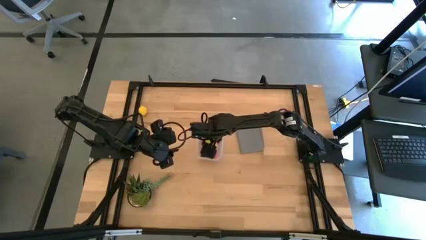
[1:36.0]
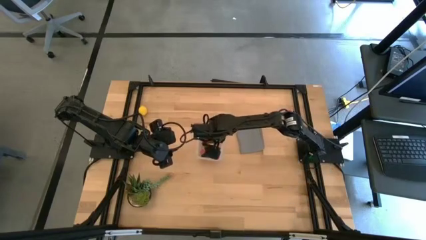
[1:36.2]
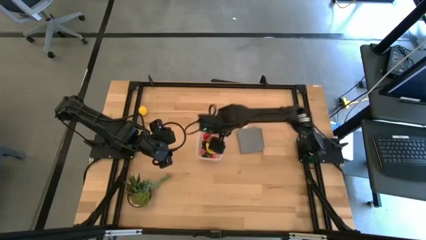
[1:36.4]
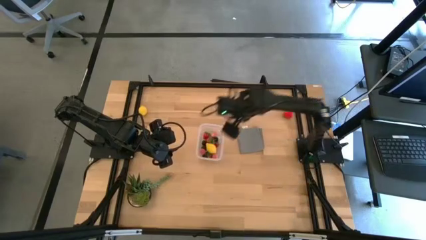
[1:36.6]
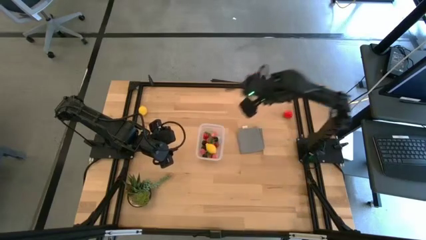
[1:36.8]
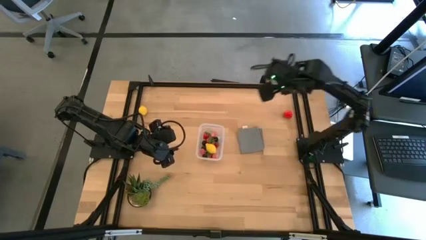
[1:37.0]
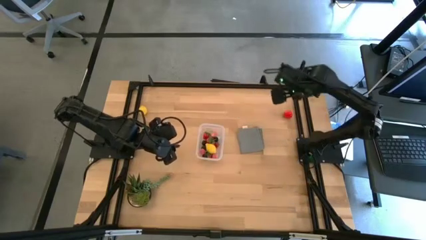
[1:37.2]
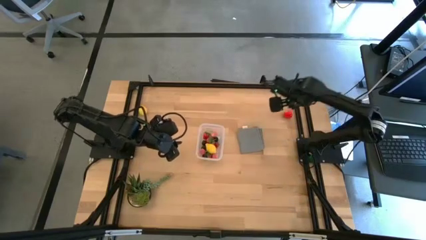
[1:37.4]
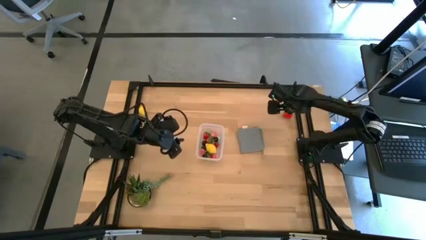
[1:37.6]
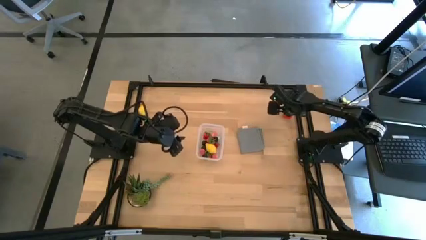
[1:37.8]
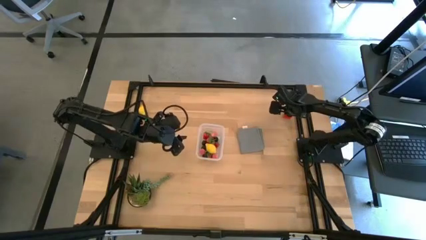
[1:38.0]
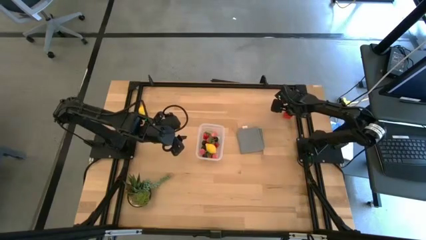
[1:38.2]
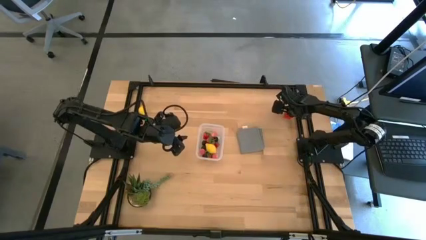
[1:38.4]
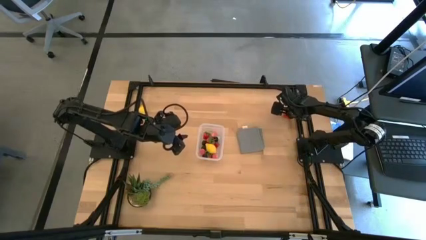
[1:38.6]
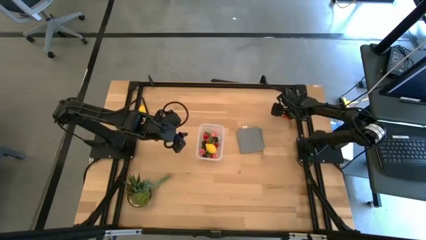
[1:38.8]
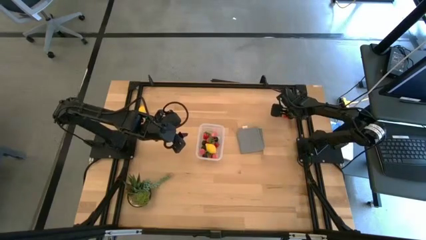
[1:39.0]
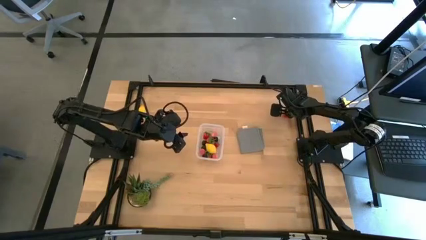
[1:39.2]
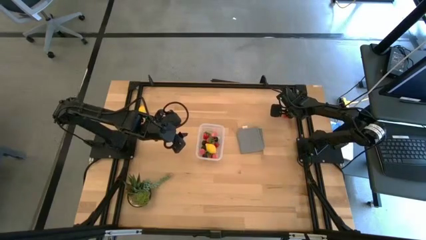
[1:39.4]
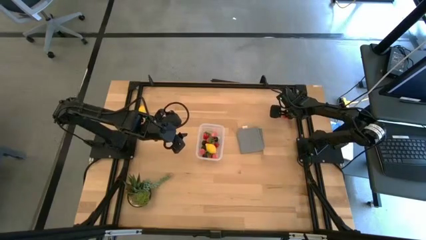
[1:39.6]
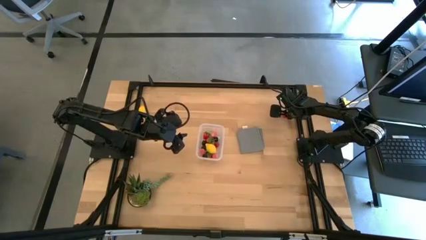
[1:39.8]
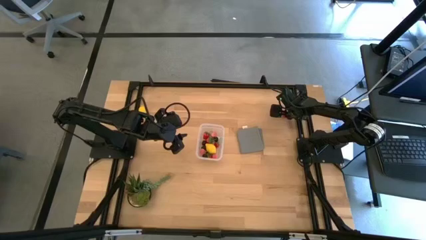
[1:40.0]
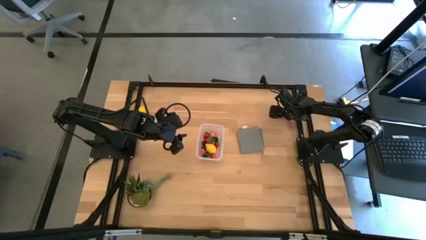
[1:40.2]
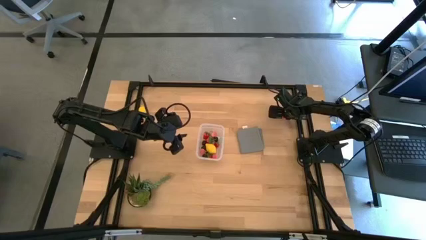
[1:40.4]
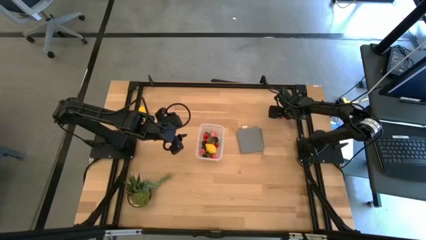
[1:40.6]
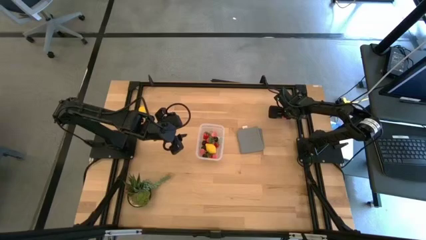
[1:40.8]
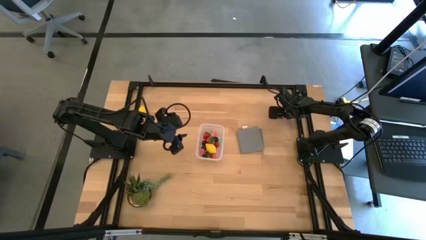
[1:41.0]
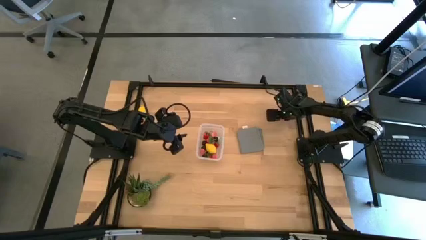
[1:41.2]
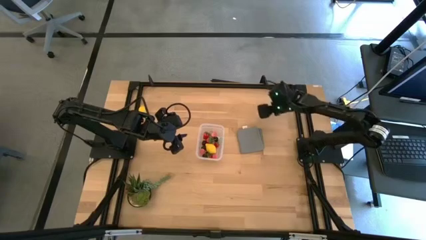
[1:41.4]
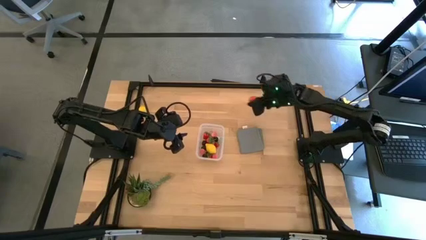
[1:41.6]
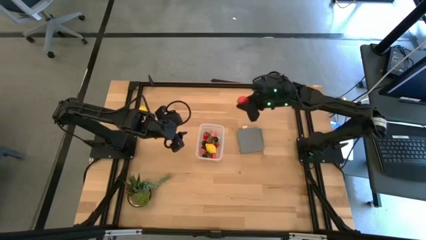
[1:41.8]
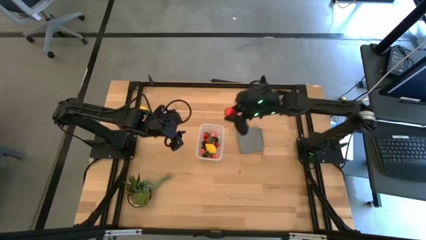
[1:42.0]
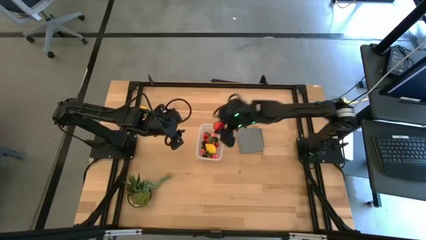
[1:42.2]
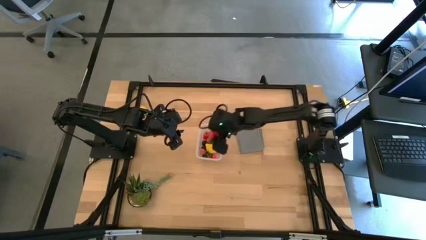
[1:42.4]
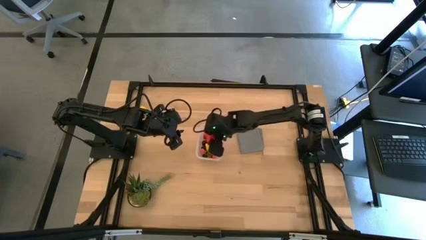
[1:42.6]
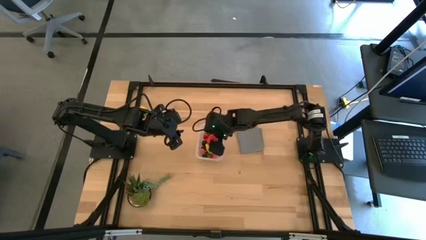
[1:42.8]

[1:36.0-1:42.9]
Task: Pick and placing Produce into tupperware
Put the strawberry into the transparent bin

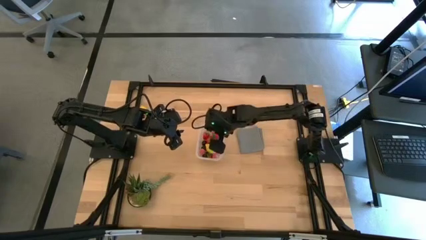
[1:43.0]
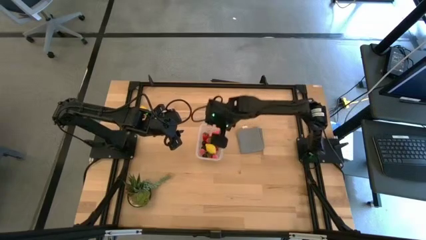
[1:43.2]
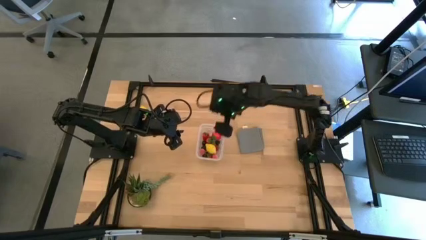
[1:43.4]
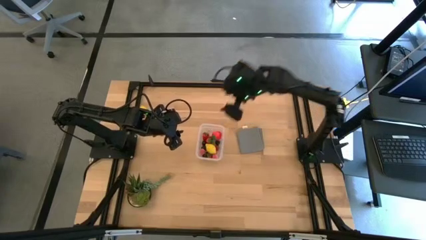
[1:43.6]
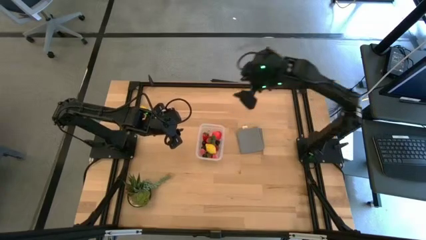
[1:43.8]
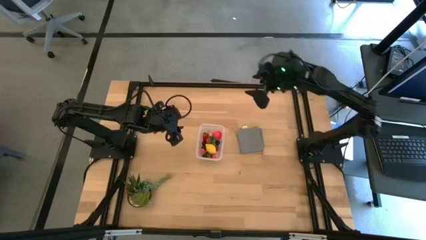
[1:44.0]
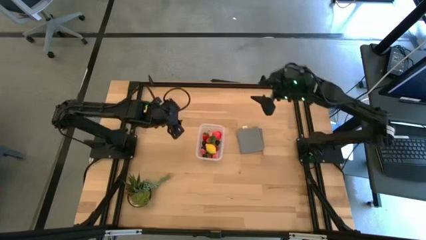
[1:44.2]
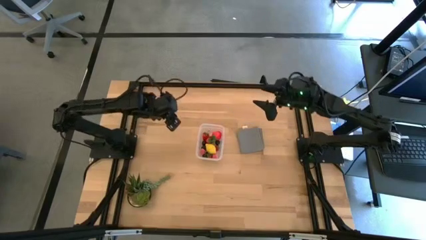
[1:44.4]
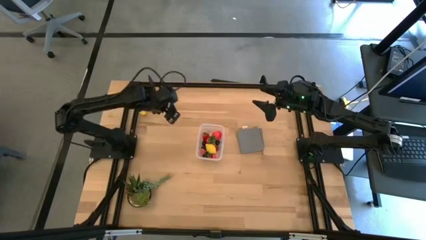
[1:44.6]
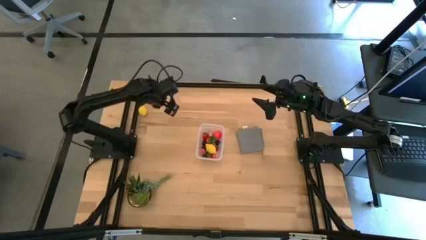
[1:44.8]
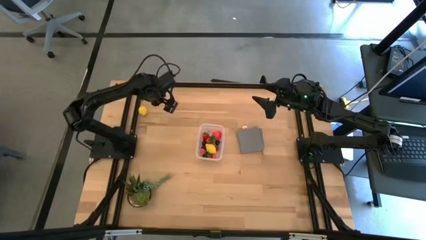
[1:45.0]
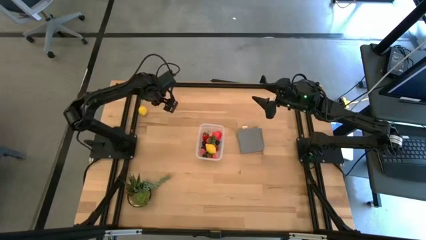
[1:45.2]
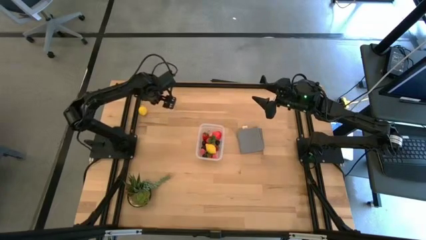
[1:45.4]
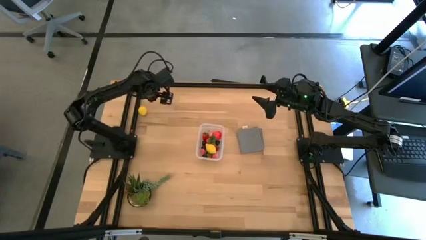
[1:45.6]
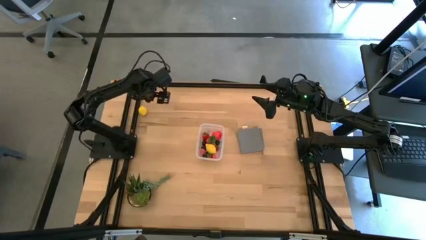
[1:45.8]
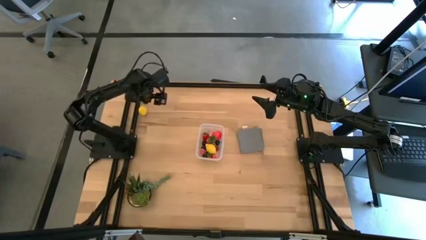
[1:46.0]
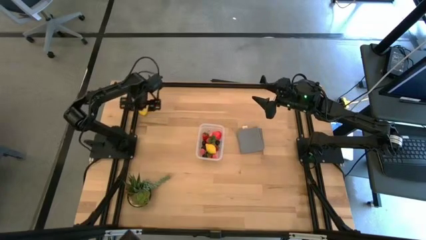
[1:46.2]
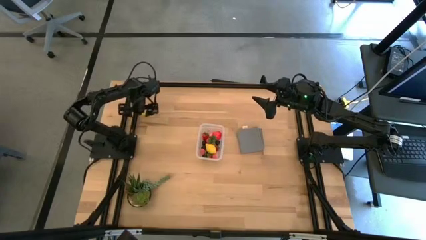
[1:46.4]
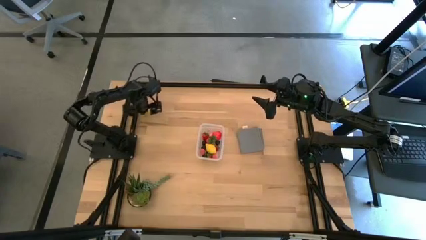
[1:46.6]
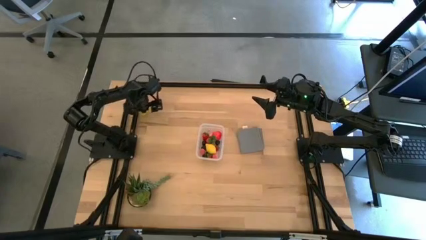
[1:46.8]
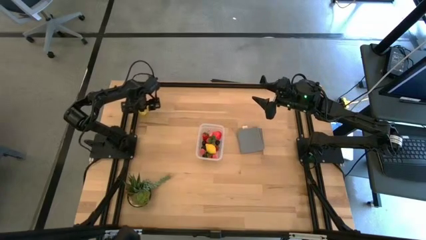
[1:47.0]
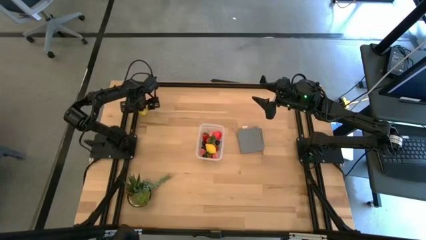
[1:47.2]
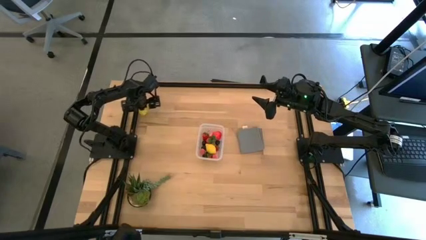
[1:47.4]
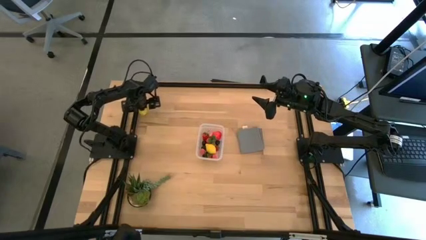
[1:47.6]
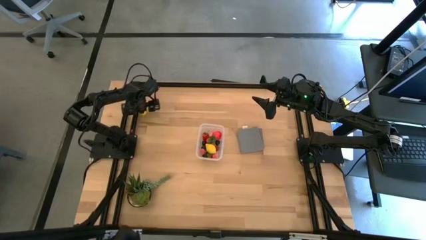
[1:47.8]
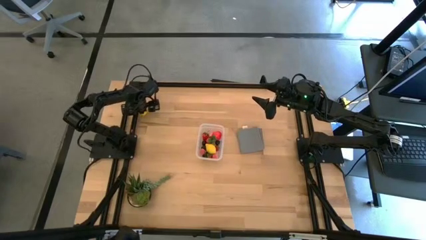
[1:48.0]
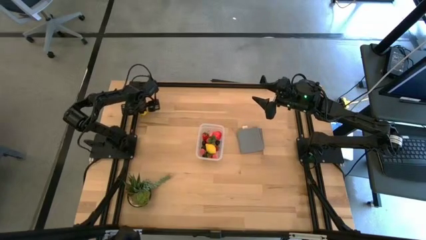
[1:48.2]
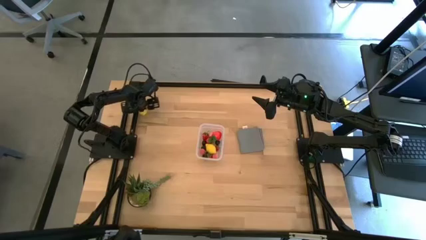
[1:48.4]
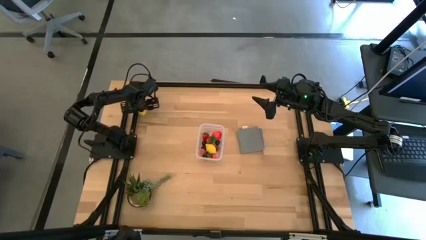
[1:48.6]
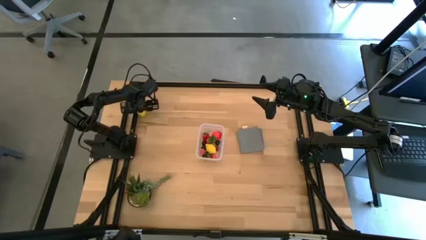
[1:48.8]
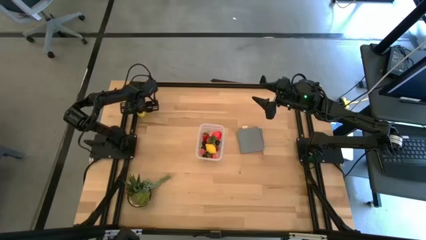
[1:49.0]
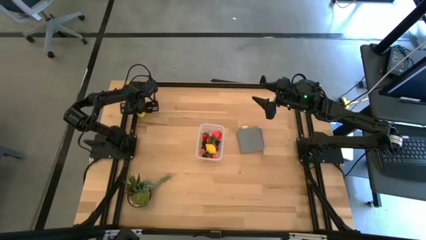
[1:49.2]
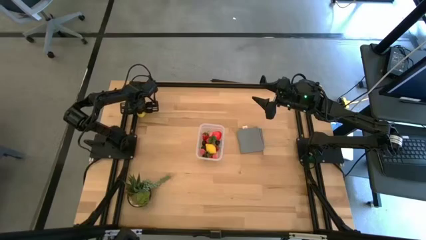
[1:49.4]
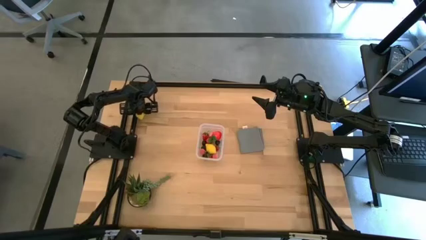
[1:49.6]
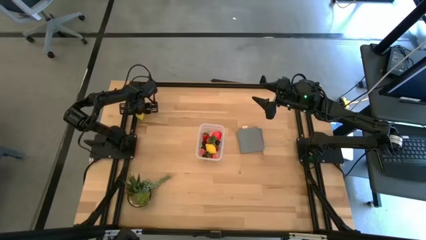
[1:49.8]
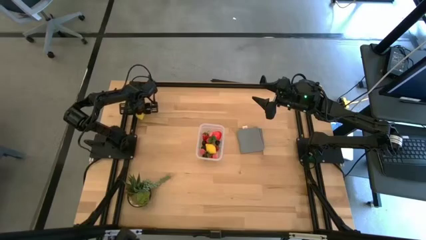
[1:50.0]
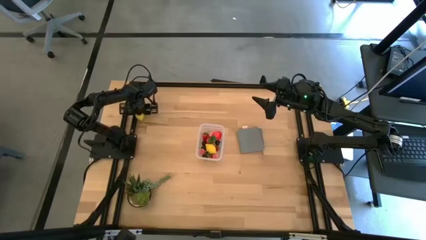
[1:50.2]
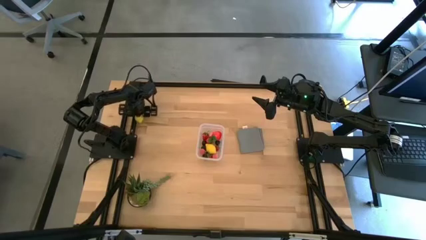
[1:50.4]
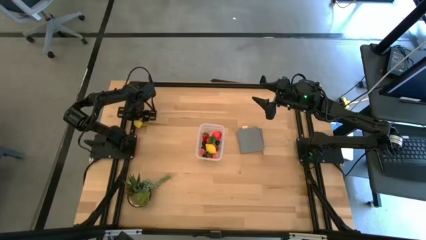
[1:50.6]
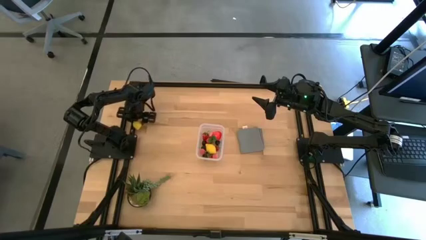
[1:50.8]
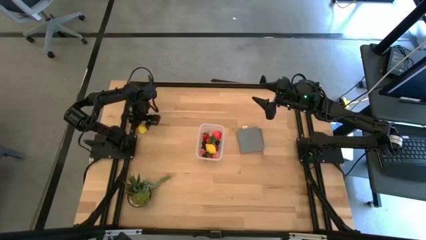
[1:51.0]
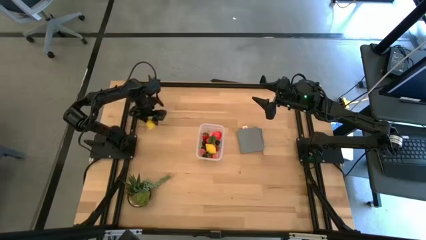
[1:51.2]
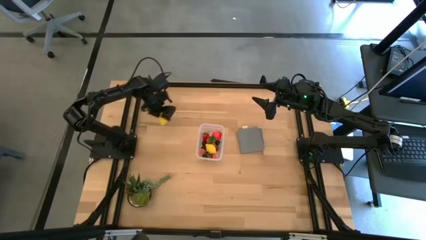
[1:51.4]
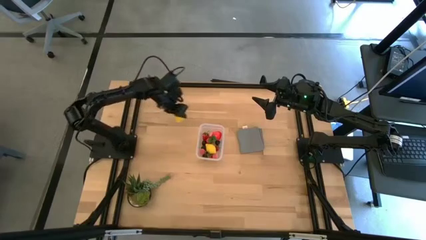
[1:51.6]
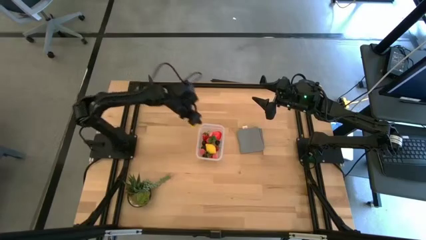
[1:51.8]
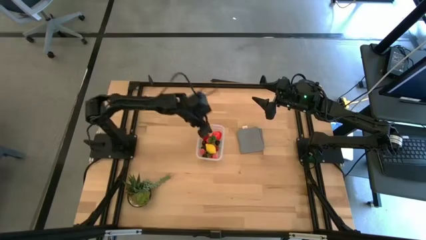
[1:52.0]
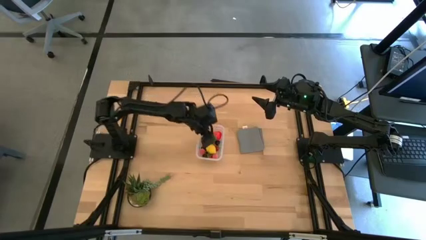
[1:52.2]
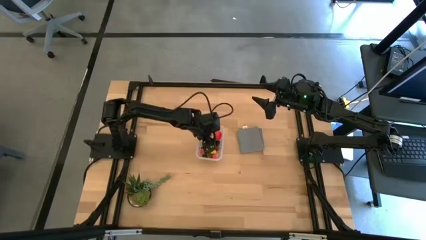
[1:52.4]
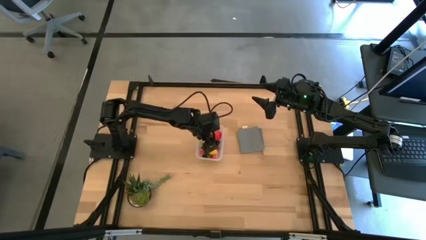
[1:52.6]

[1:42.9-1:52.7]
Put the lemon into the transparent bin

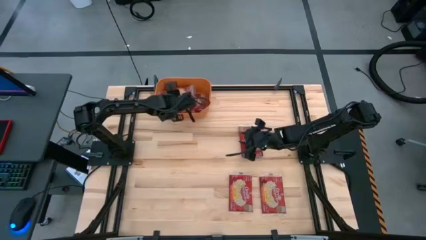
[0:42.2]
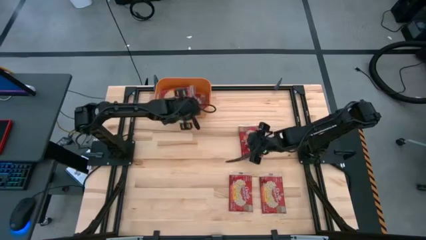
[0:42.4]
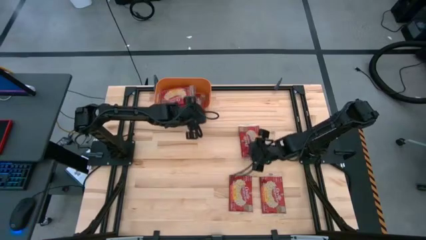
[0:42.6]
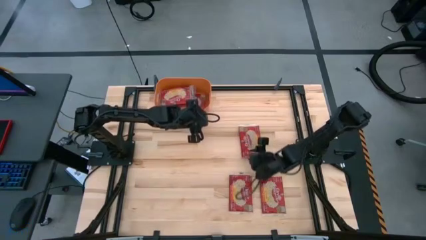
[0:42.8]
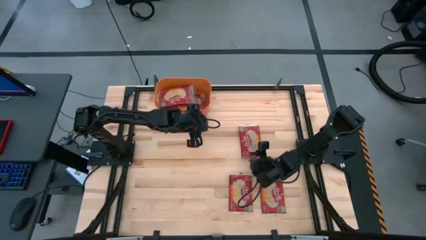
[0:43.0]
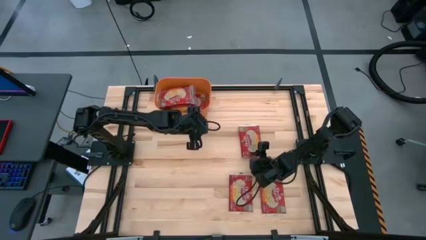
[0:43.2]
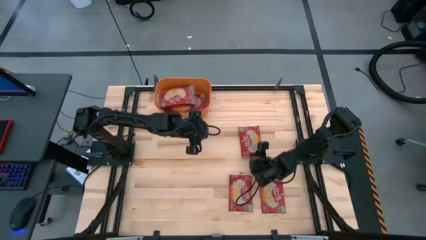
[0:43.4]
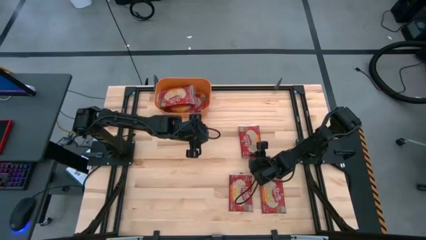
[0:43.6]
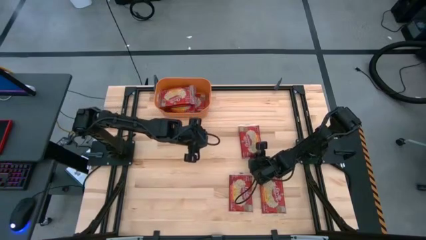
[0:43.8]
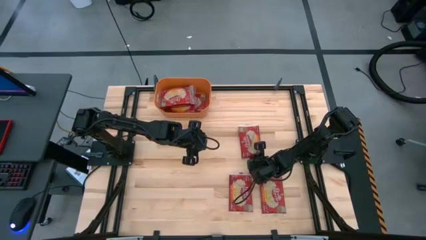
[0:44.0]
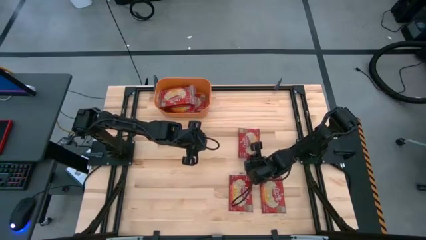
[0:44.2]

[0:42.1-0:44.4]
Task: Sort popcorn bags into baskets
Put the popcorn bag into the orange bin
